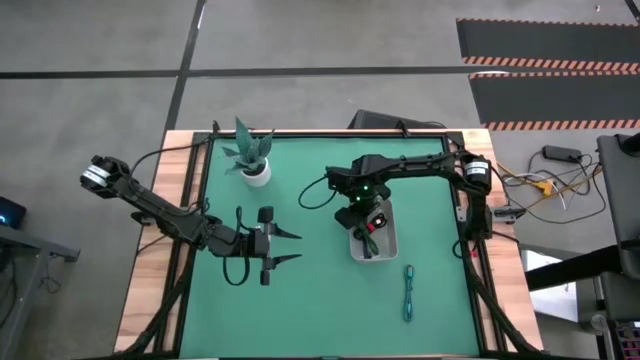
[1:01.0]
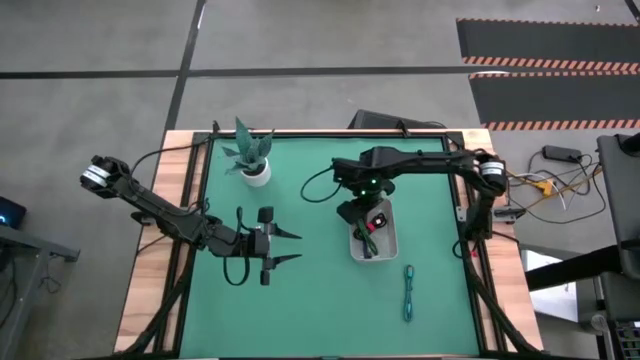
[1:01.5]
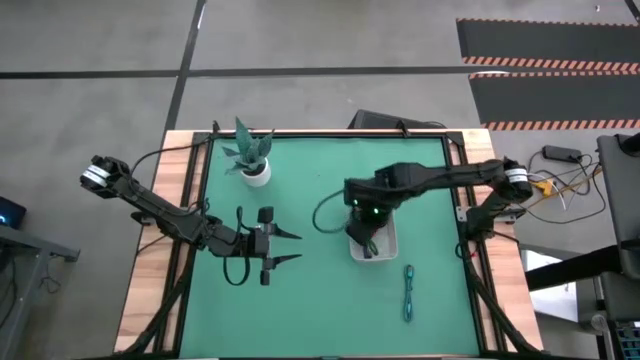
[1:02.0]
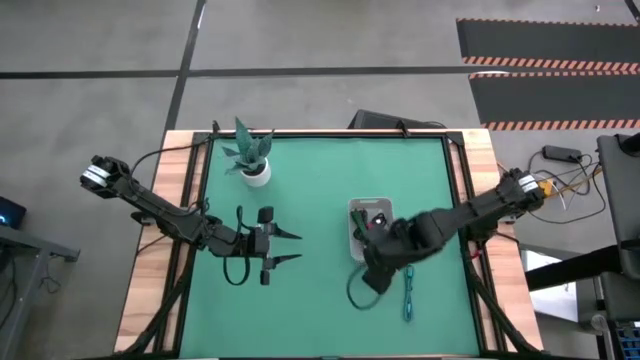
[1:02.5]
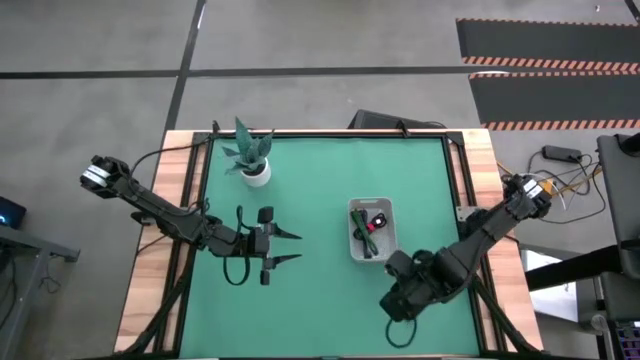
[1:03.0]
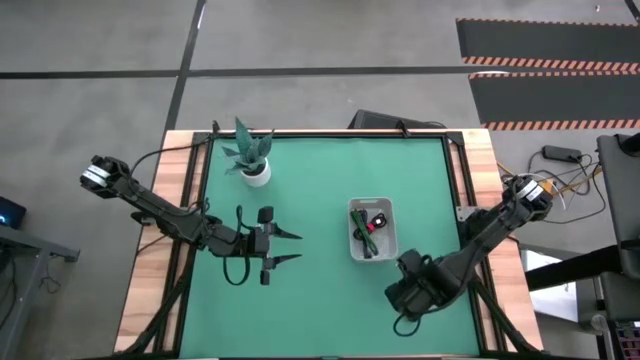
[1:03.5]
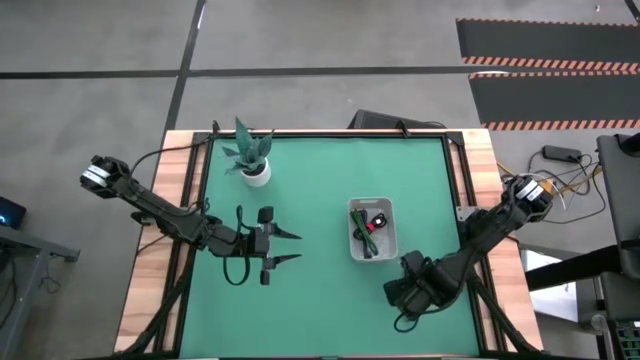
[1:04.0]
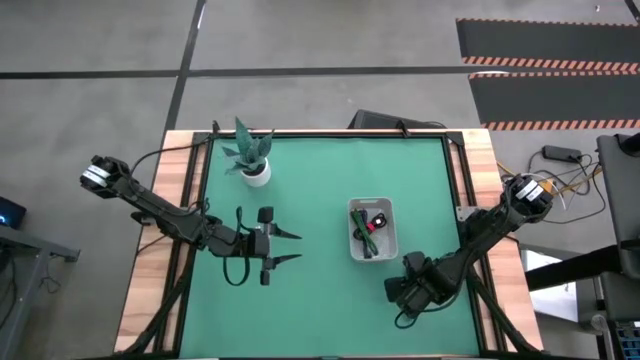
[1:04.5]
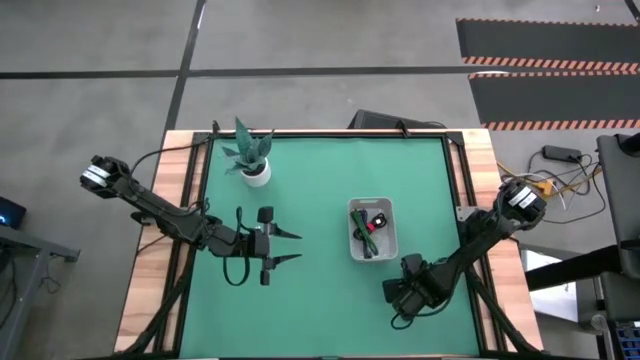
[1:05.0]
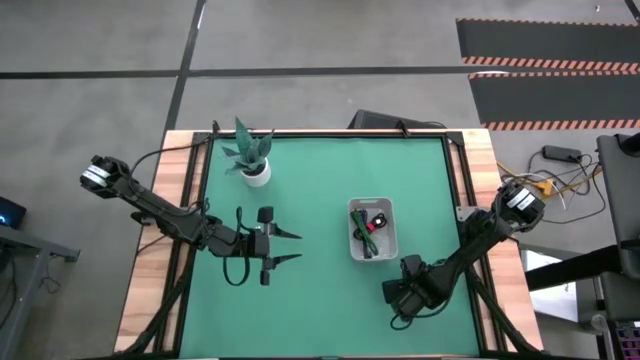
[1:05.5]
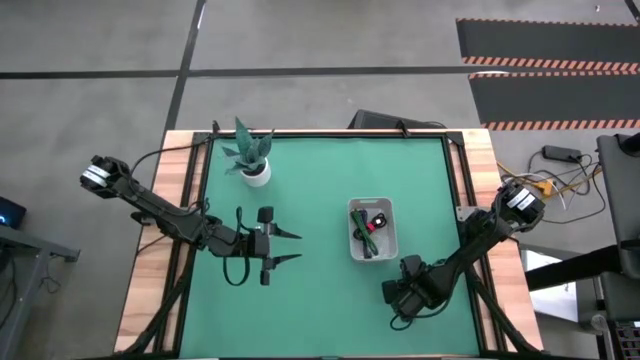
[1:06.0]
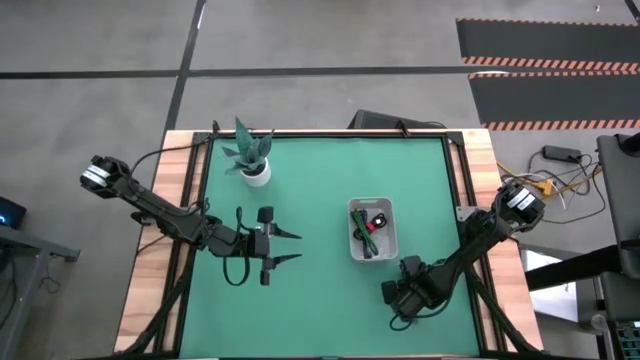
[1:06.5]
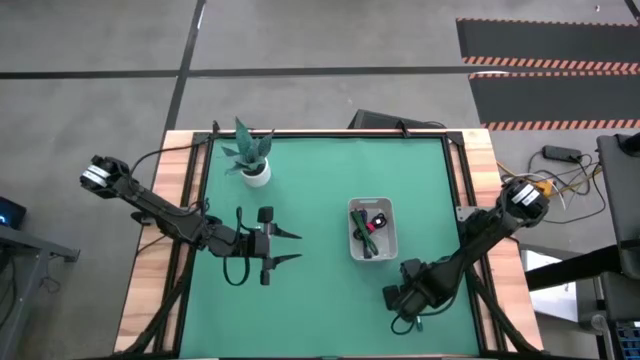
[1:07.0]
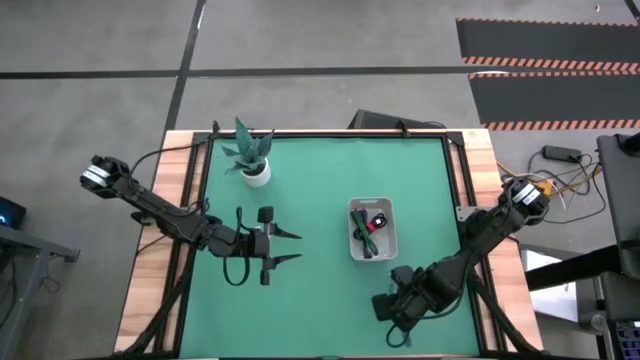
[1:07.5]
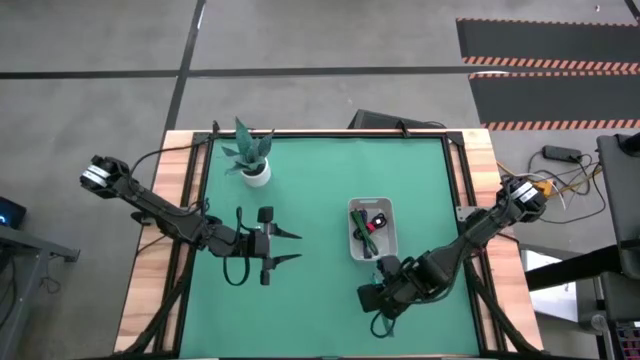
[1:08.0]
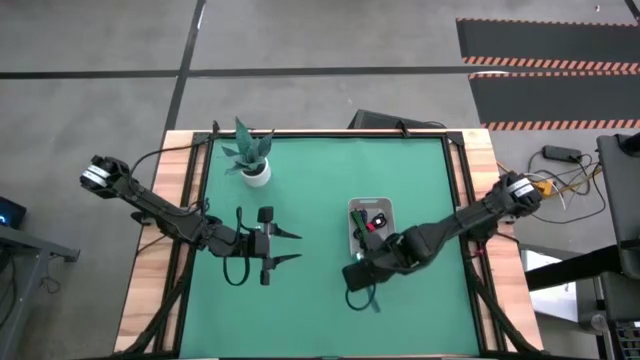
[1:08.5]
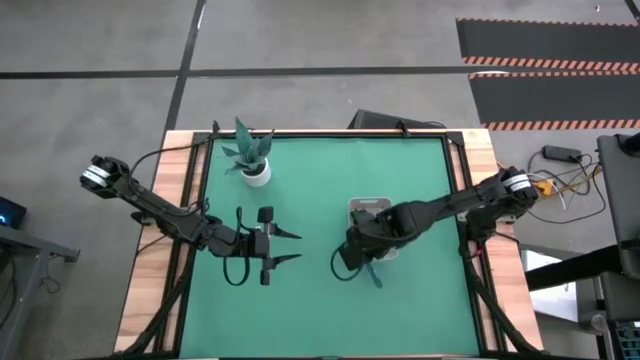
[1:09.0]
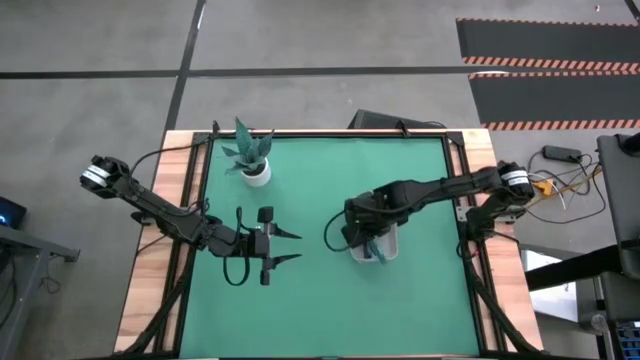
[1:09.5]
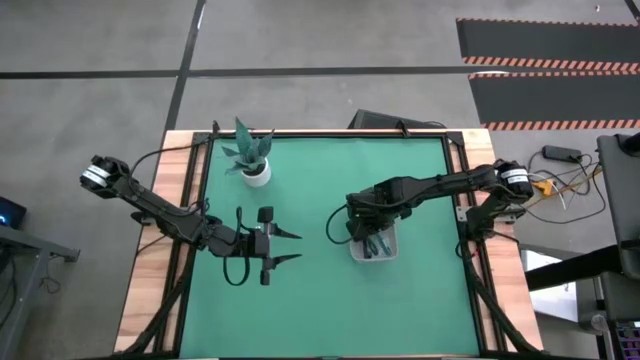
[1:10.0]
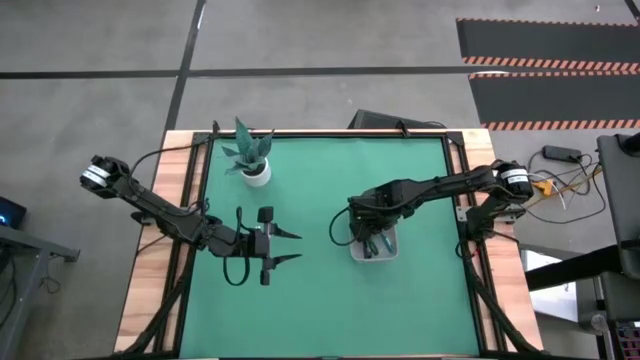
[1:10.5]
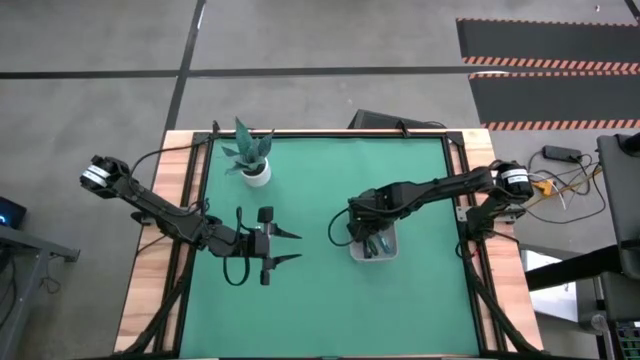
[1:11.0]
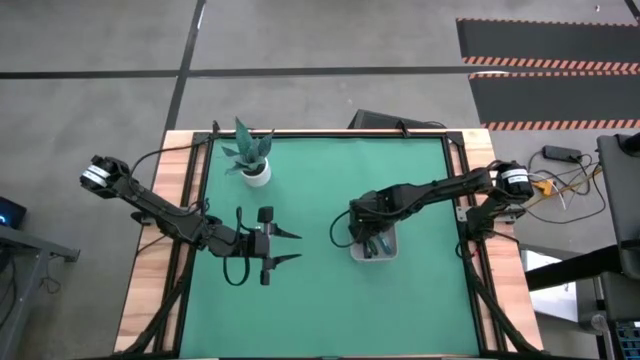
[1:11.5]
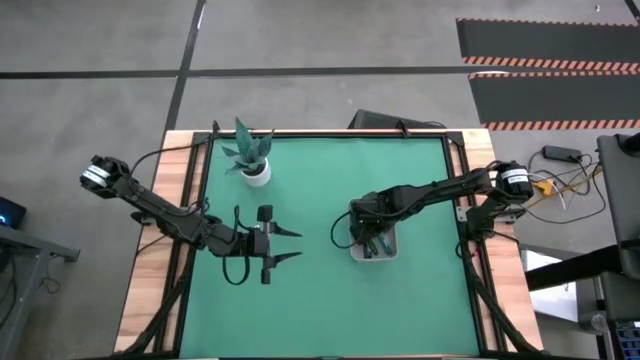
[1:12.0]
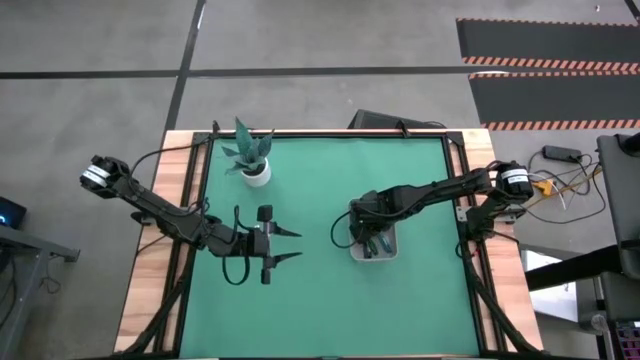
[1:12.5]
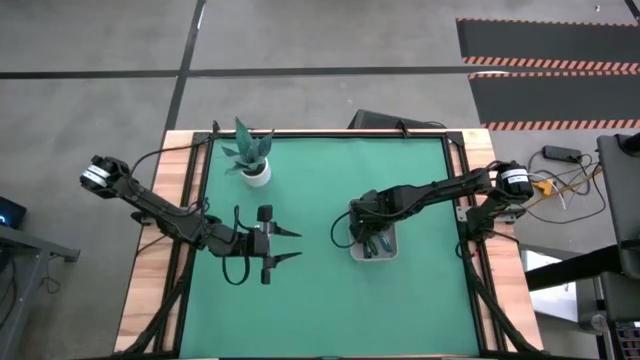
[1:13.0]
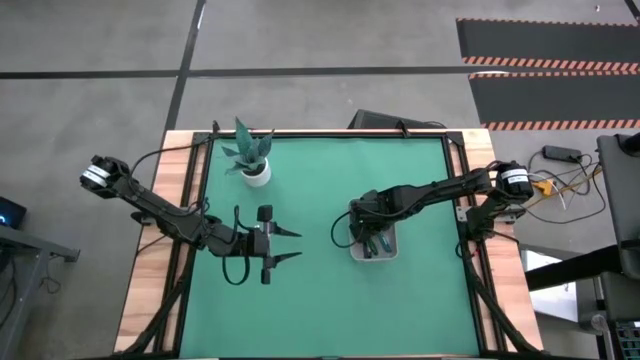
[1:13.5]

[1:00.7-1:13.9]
Task: Pick and place USB-C Cables
Put the blue charger cable into the gray bin

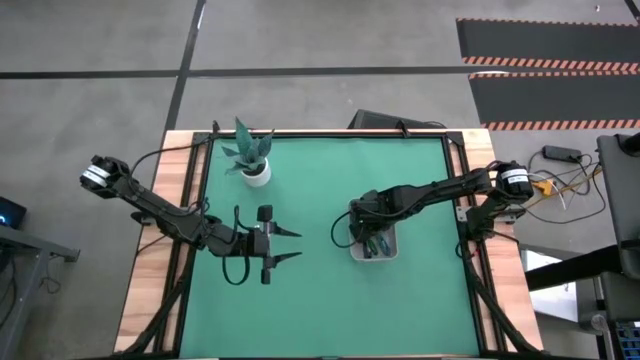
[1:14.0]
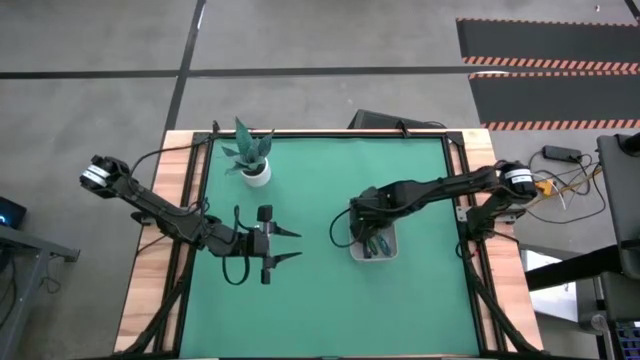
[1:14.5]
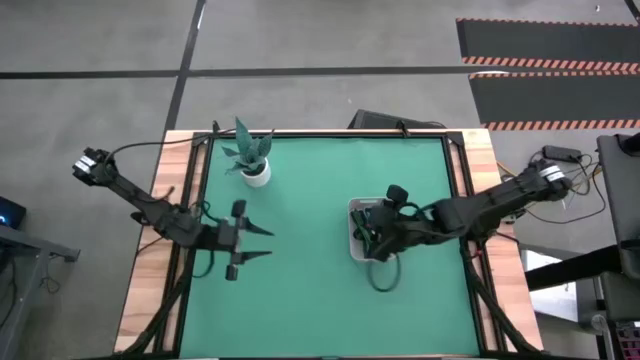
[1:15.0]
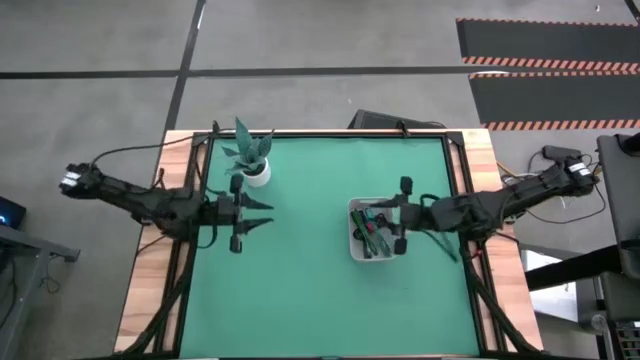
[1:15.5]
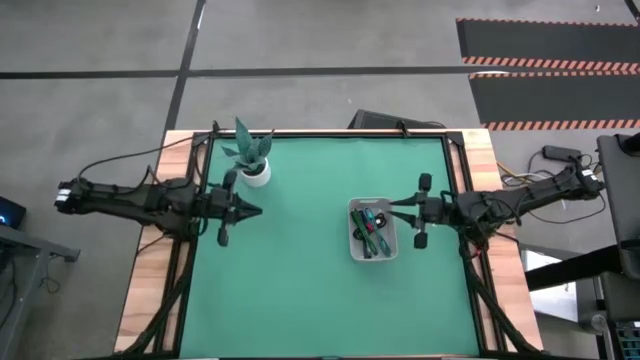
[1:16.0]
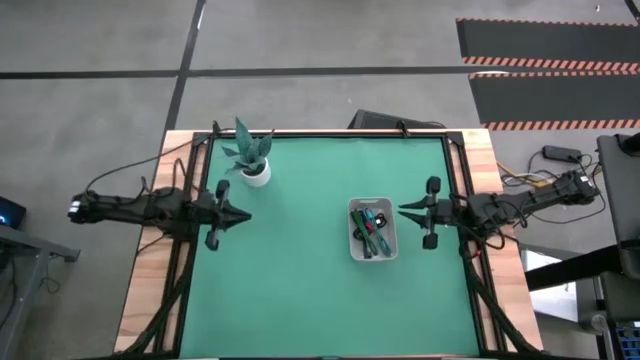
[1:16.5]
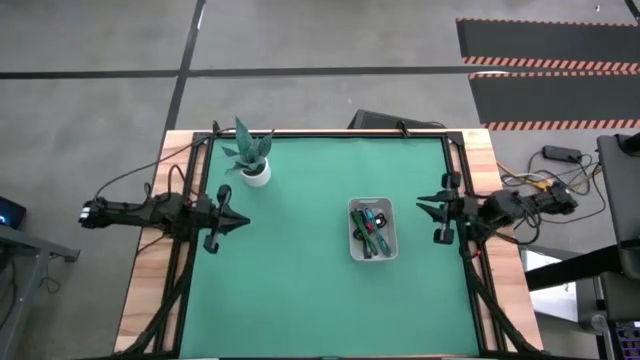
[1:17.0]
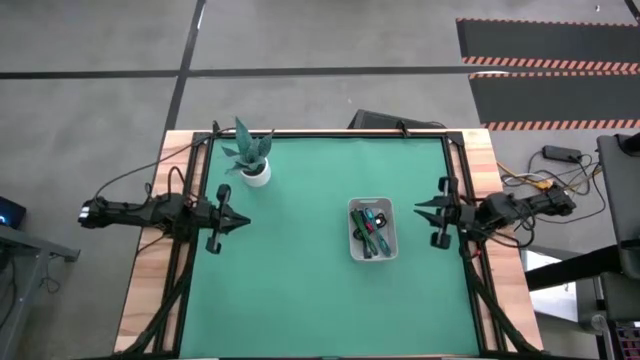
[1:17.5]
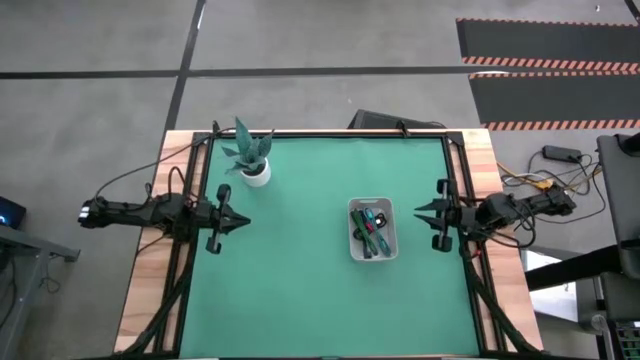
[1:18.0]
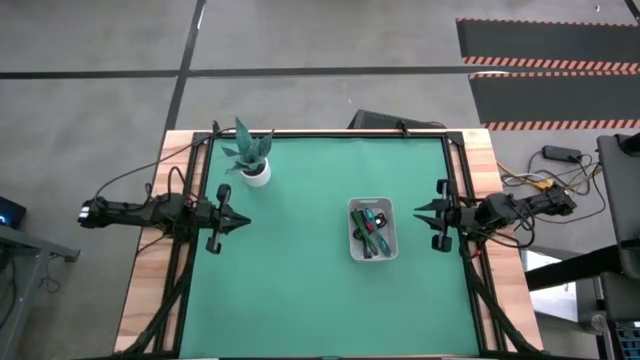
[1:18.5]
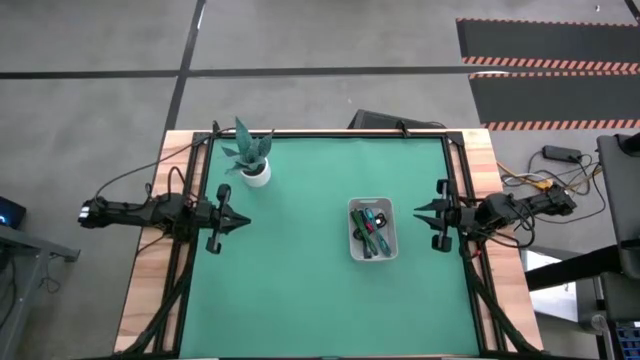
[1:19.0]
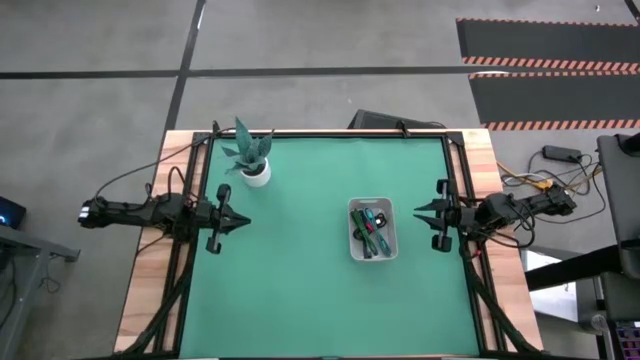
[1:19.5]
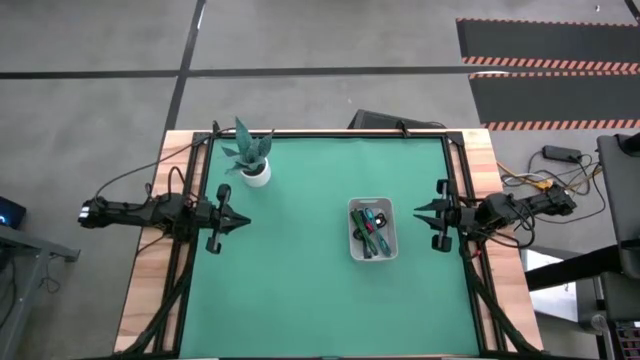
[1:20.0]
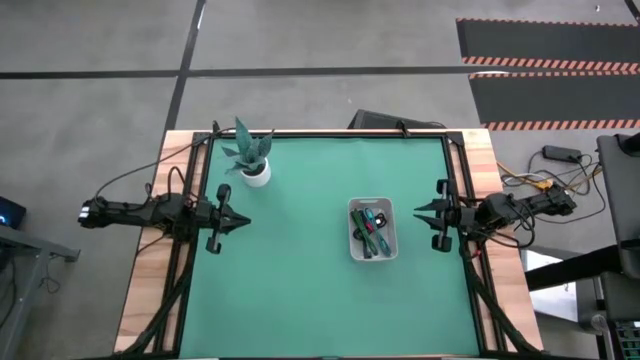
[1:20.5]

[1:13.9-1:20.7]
Return to Home Position
